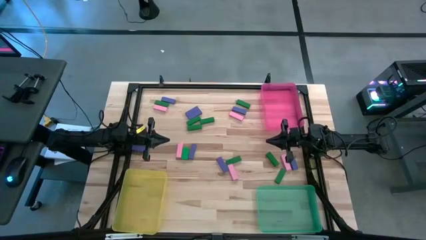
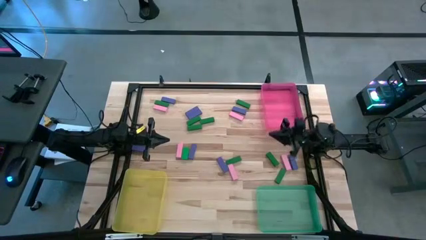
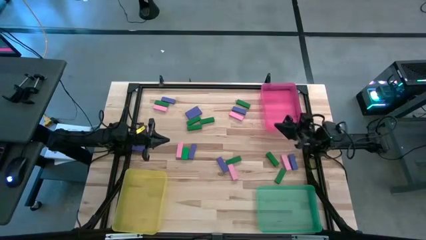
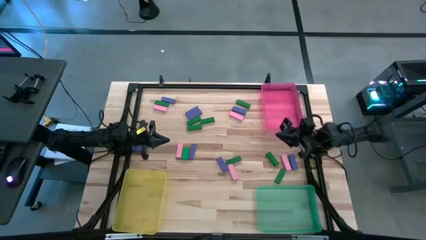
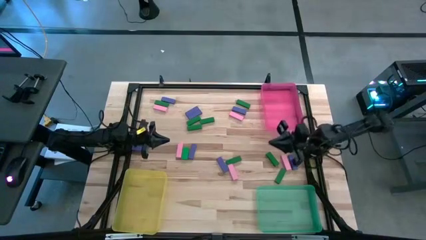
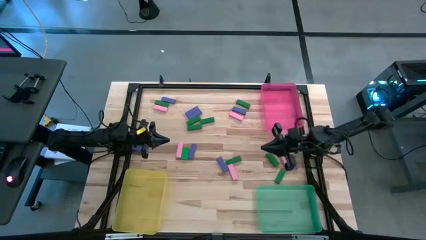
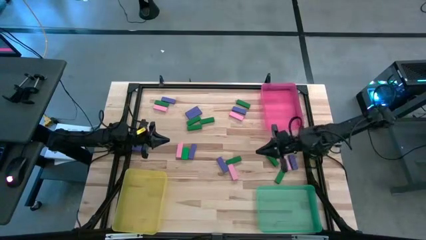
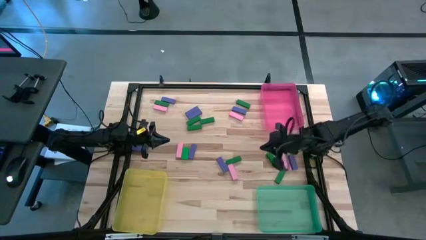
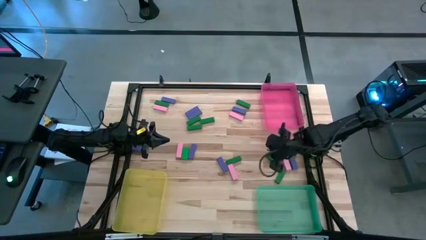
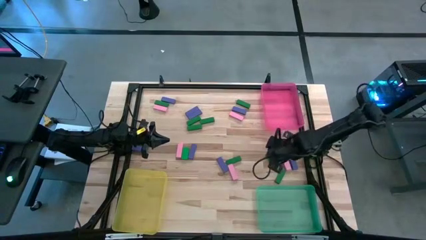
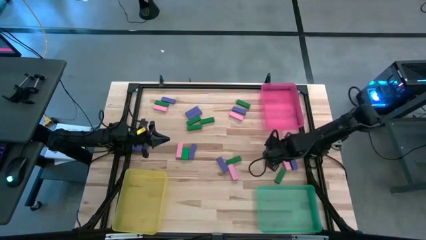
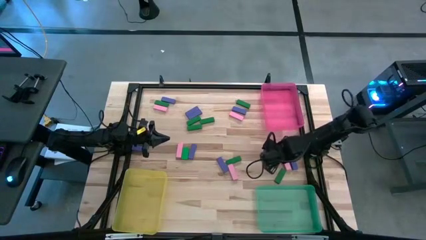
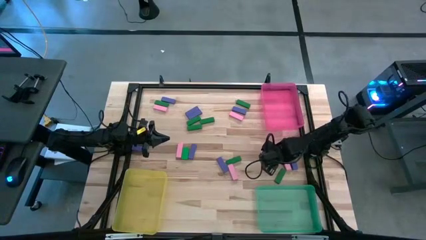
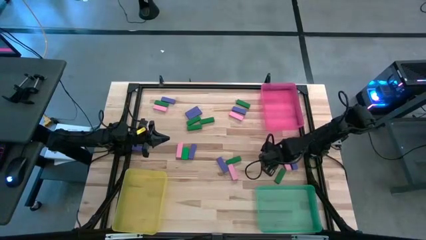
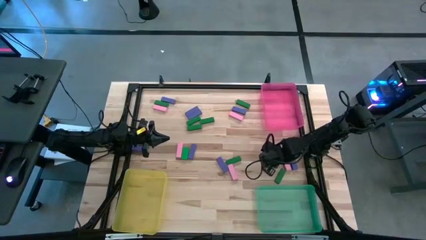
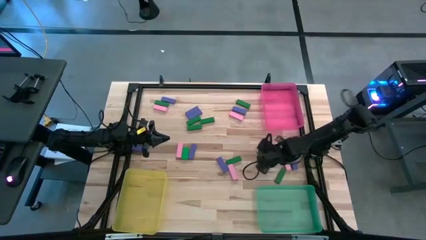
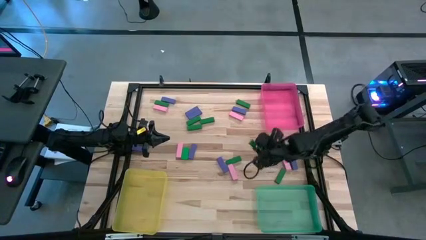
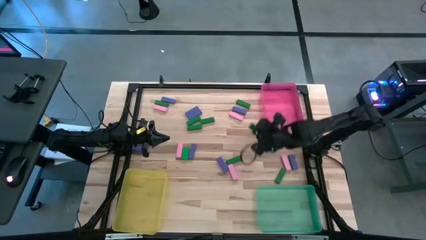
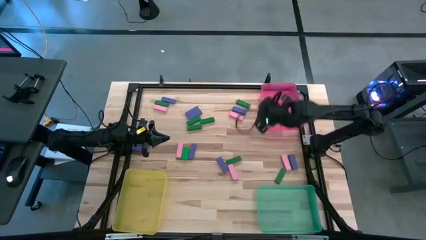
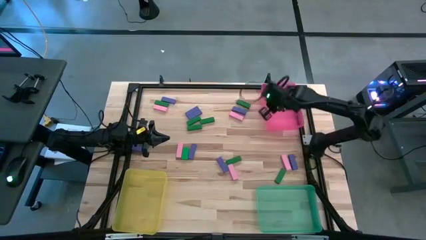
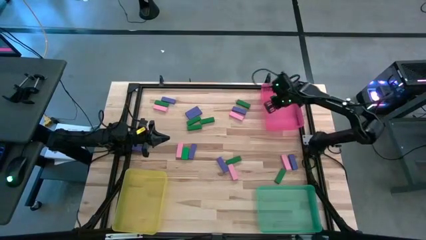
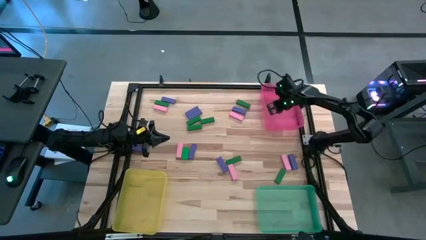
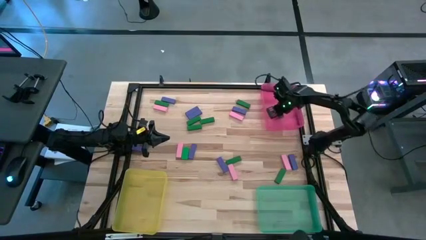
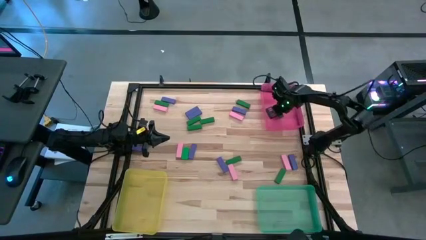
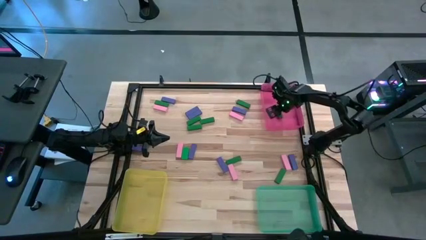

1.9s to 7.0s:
Task: Sort blocks
Put the green block into the pink bin

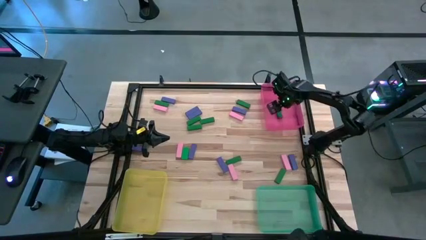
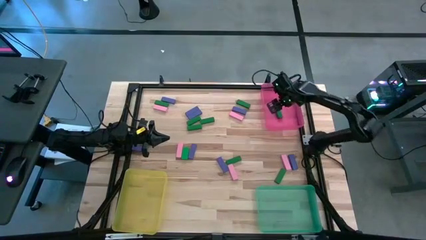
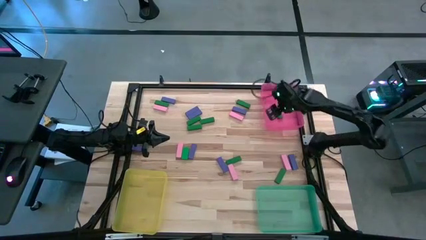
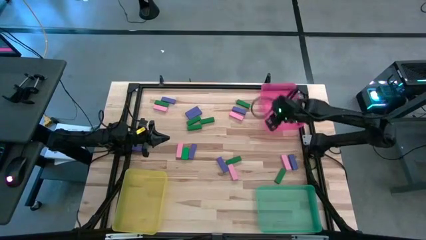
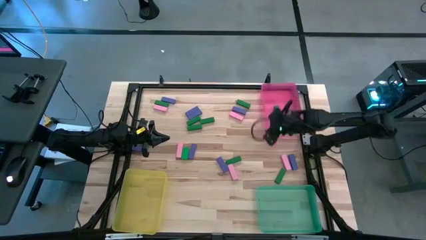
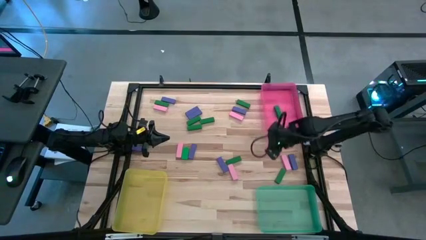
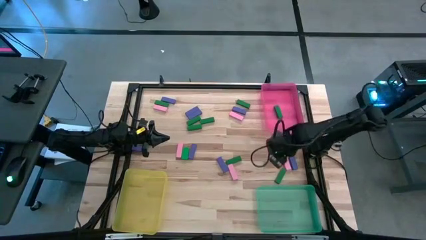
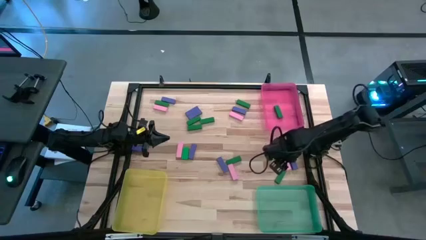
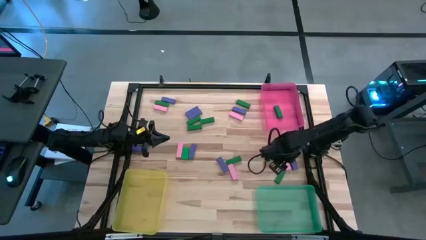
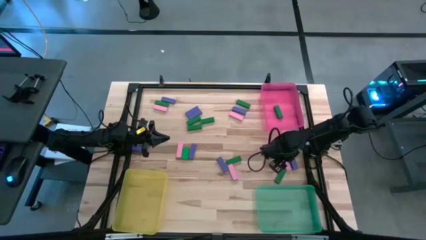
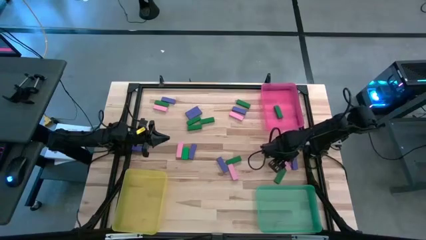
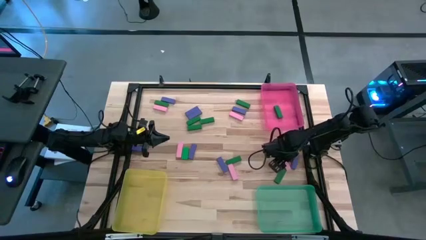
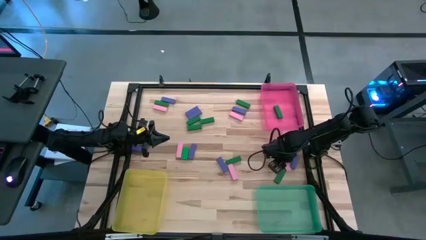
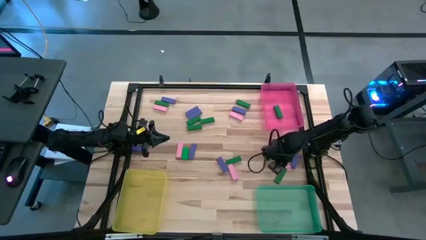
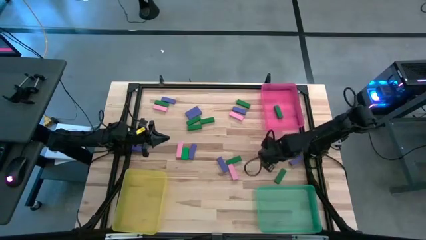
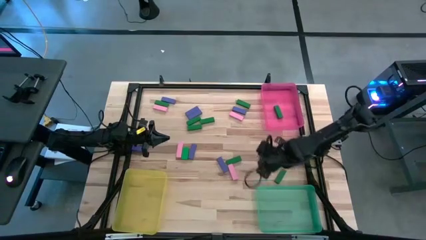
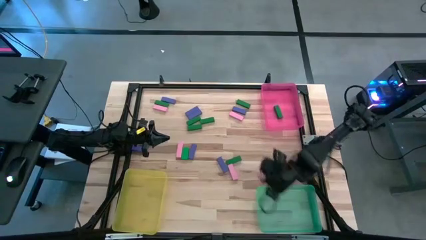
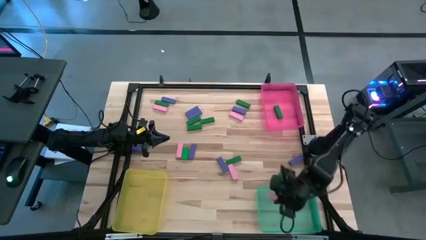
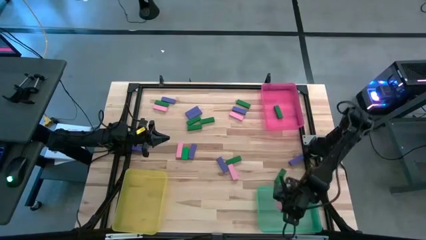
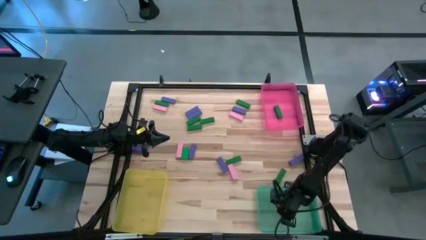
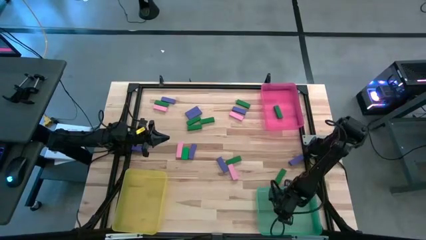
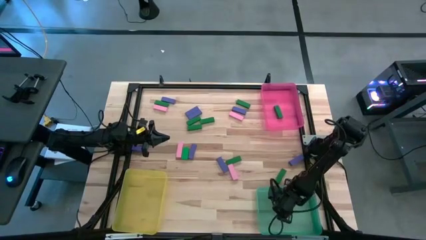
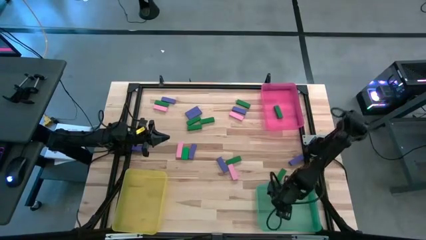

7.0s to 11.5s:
Put the pink block into the green bin

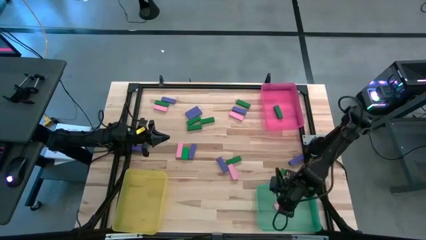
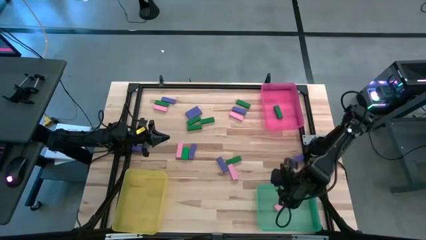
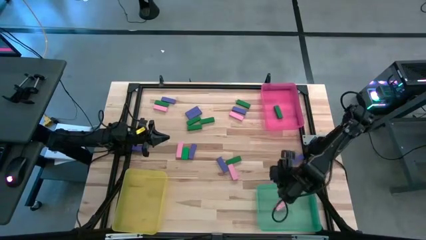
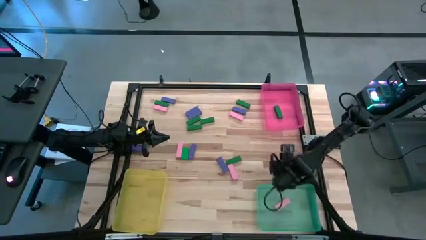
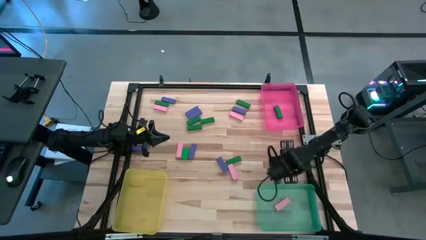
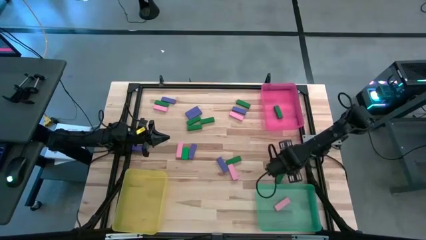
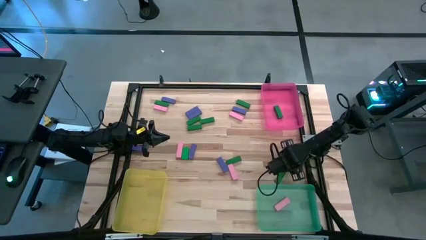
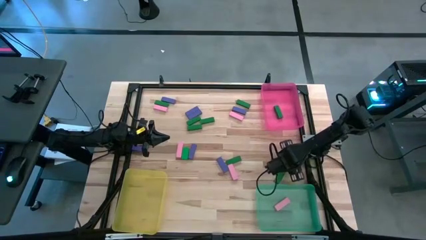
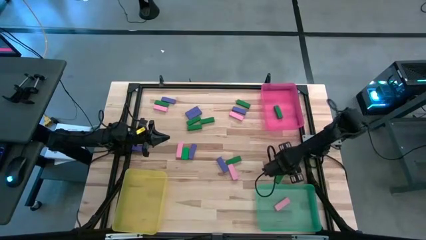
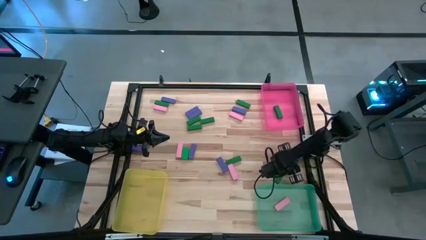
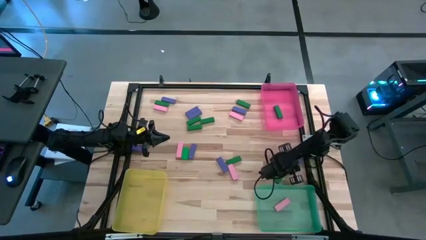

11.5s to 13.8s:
Put the blue block into the yellow bin

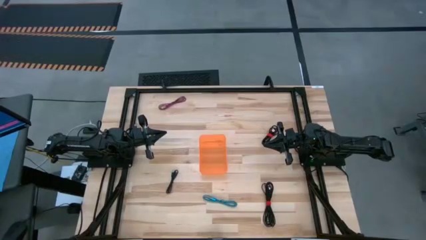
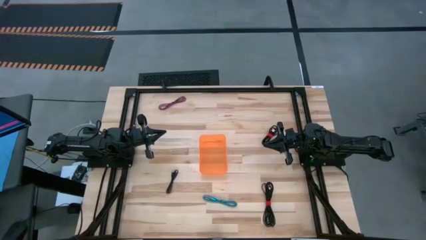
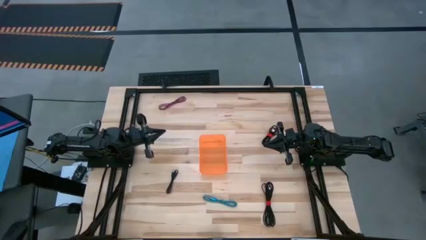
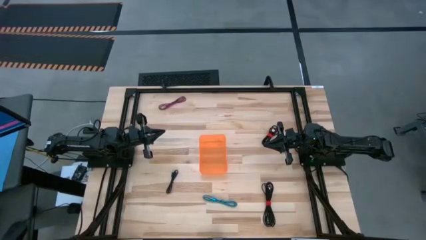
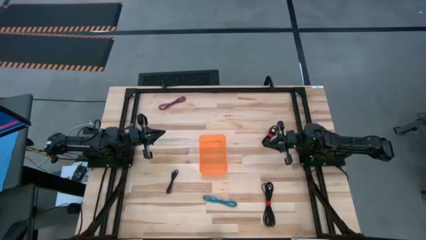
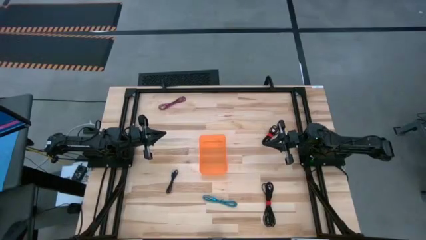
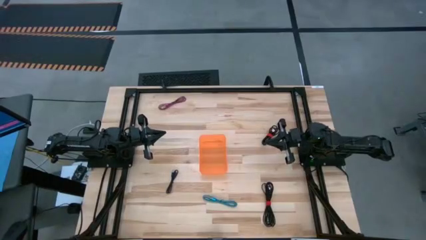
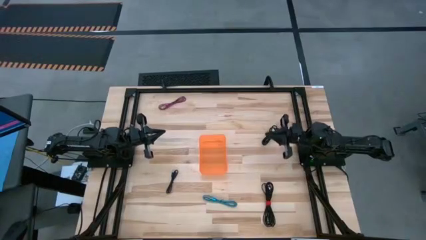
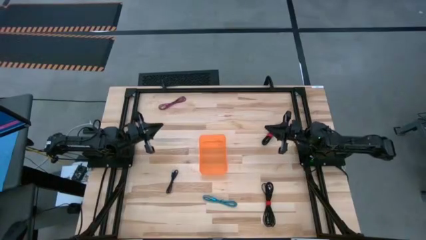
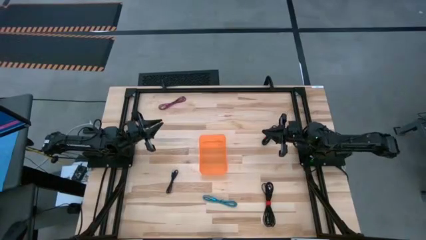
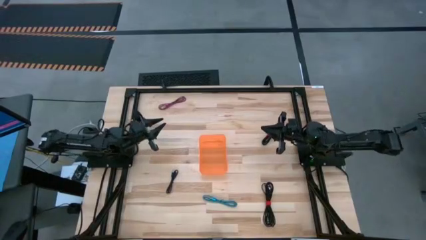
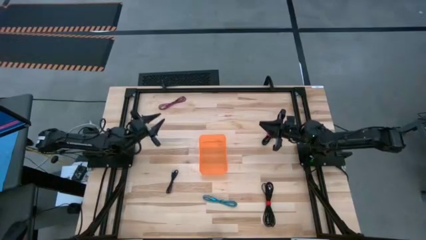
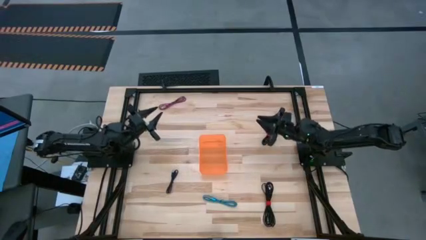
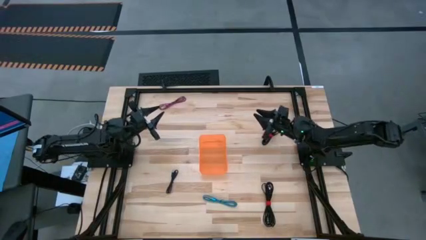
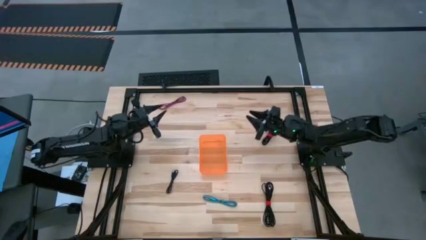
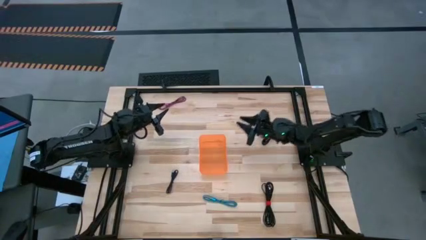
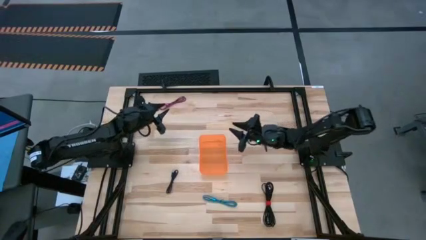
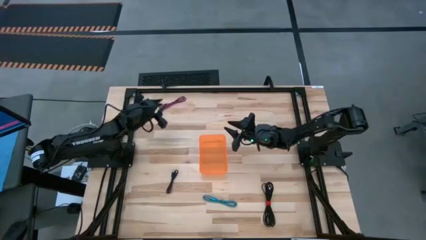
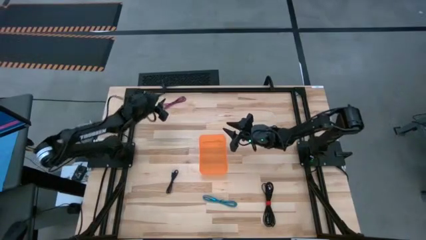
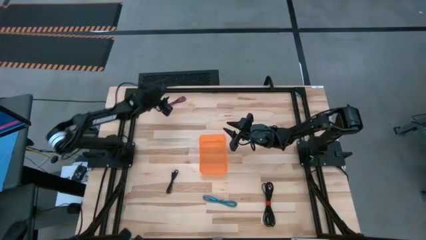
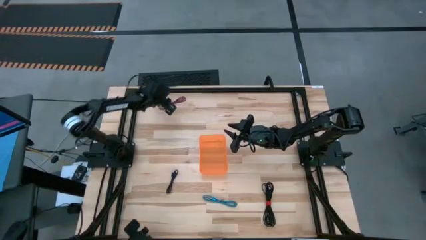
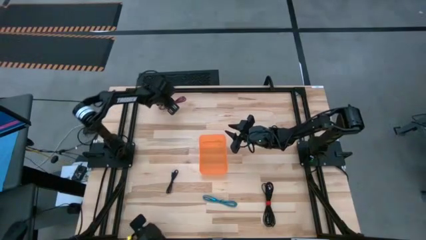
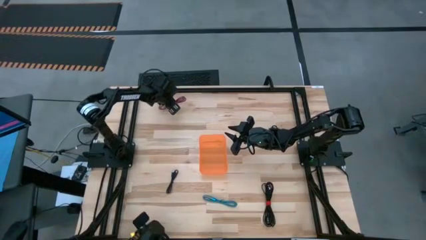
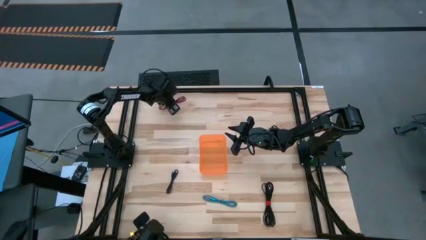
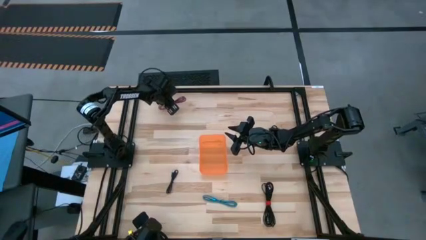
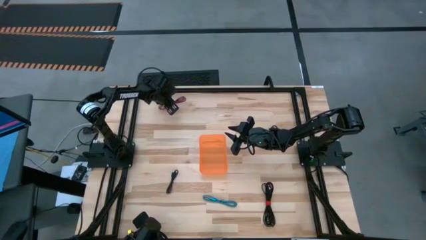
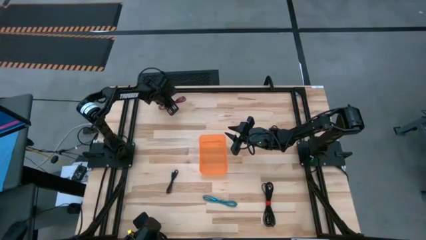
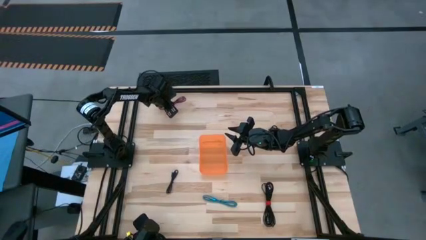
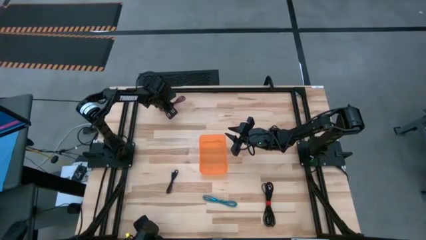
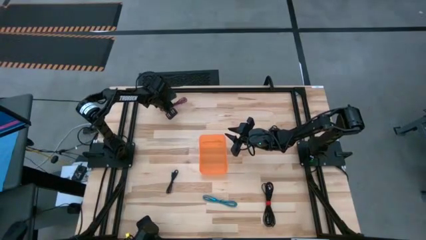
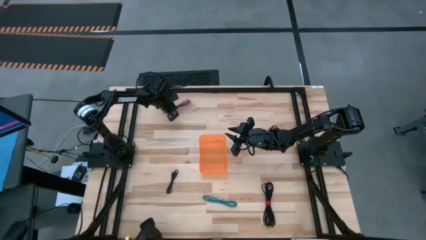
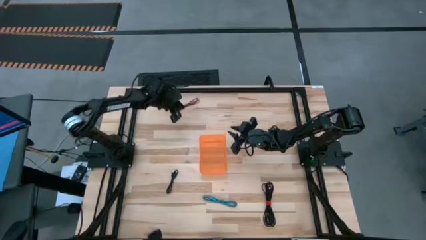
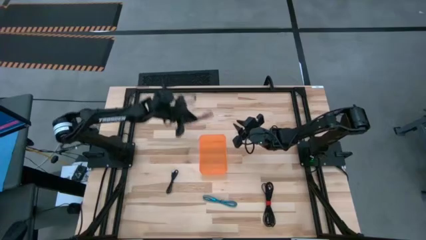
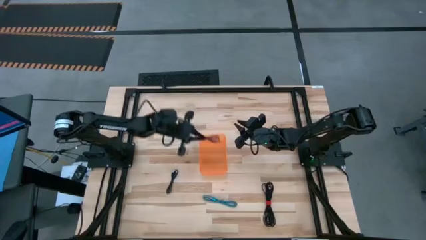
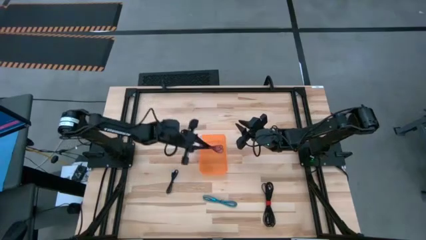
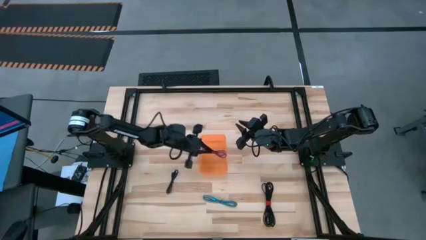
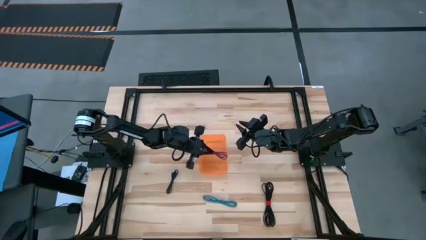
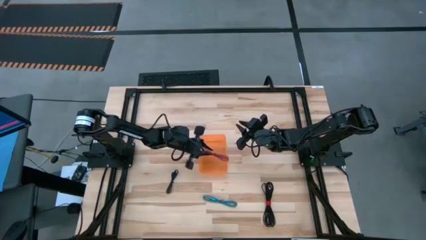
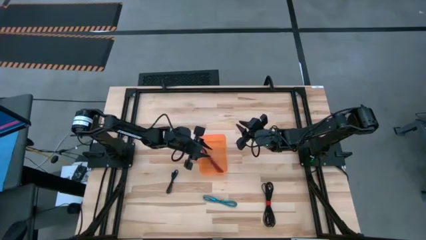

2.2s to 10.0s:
Task: Pick and place USB-C Cables
Put the pink charger cable into the orange bin
